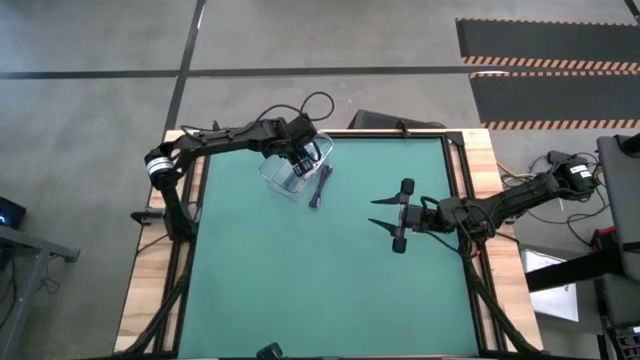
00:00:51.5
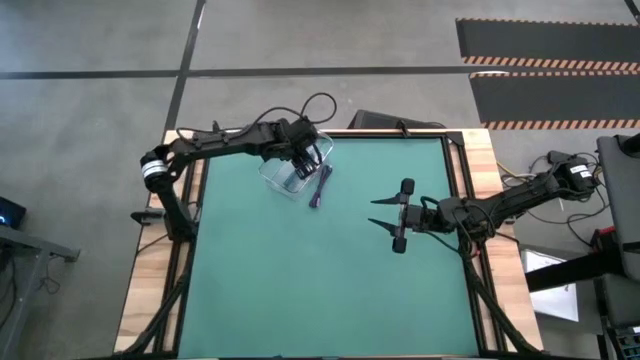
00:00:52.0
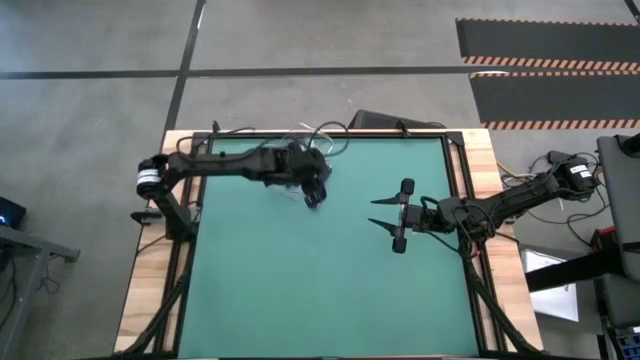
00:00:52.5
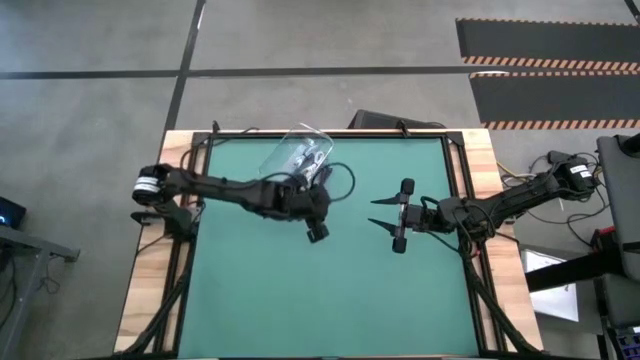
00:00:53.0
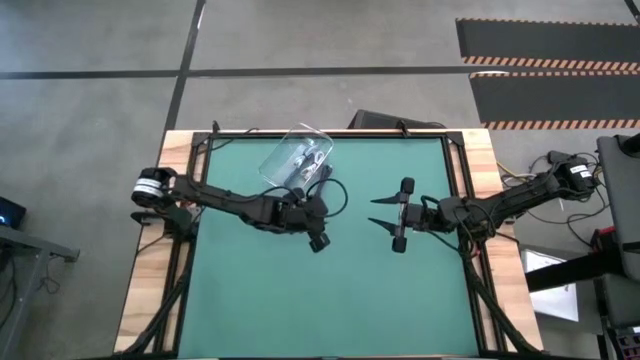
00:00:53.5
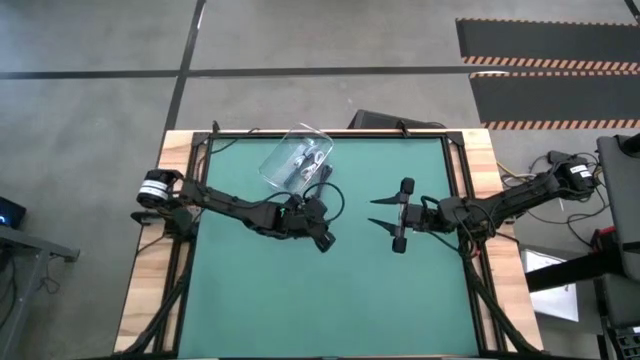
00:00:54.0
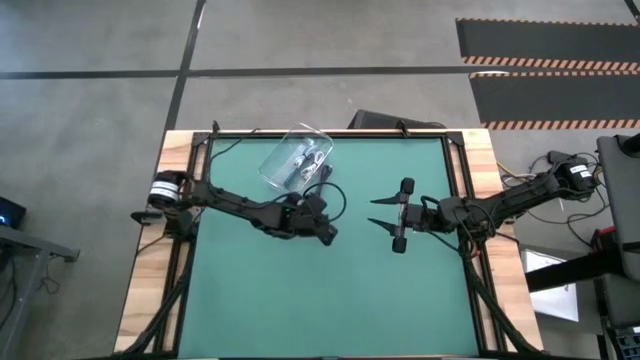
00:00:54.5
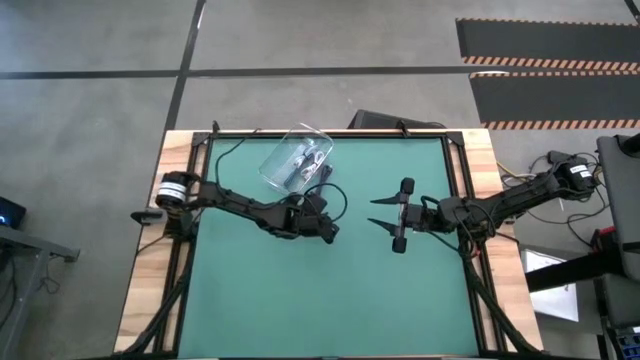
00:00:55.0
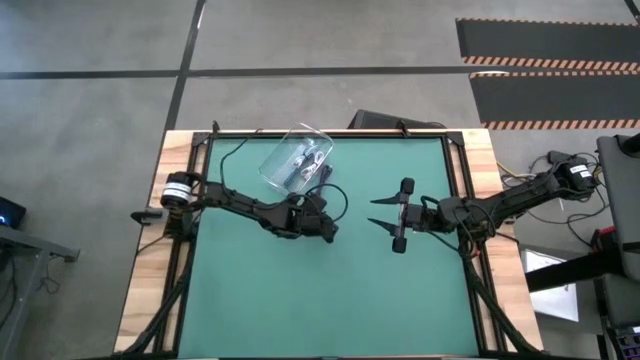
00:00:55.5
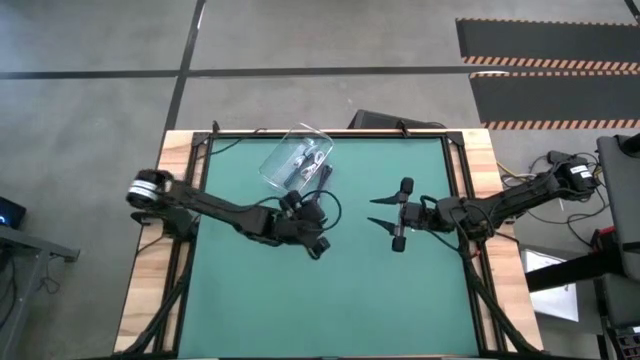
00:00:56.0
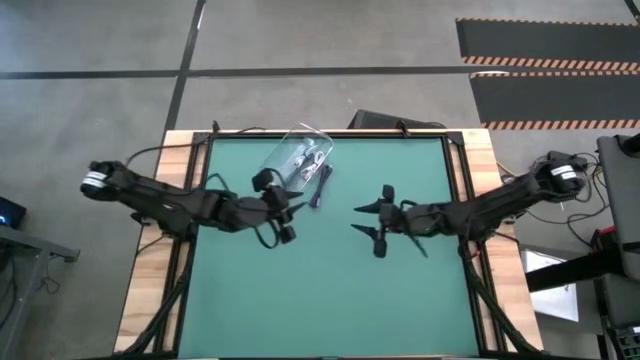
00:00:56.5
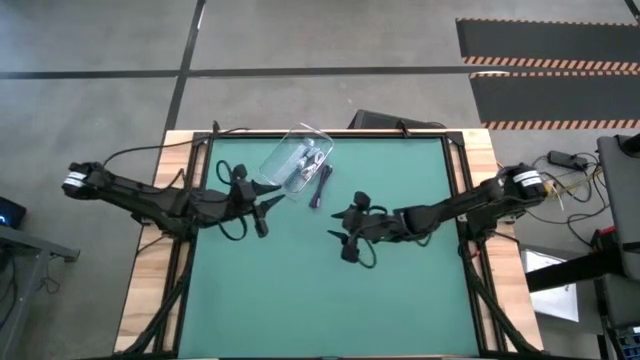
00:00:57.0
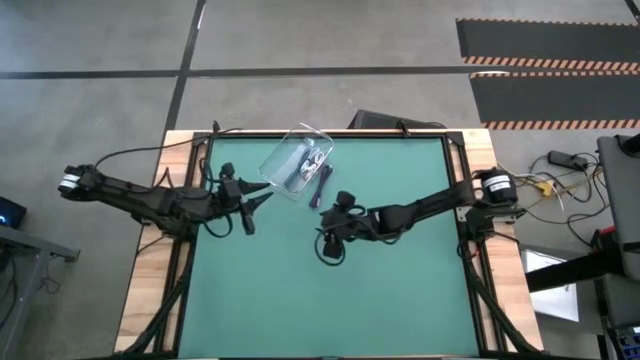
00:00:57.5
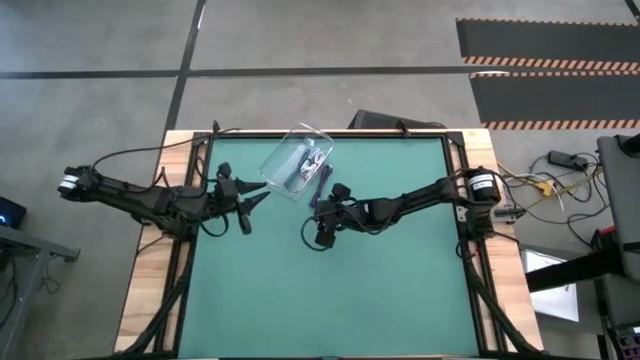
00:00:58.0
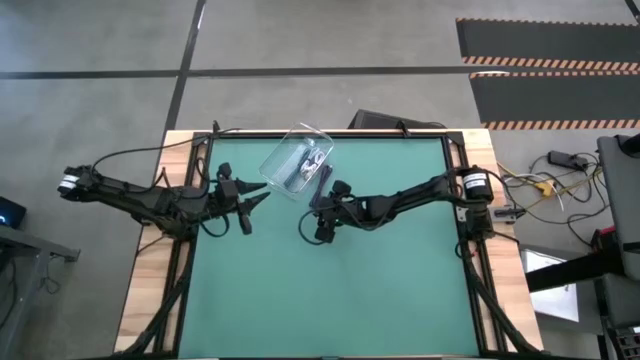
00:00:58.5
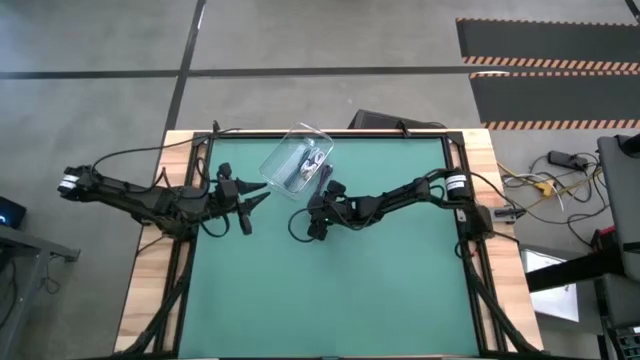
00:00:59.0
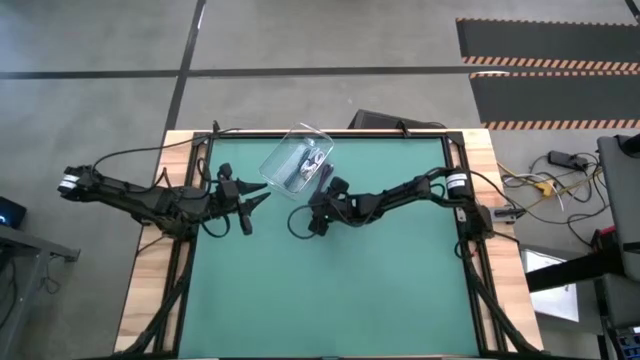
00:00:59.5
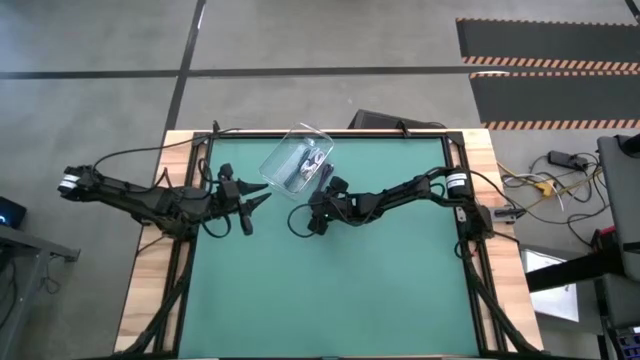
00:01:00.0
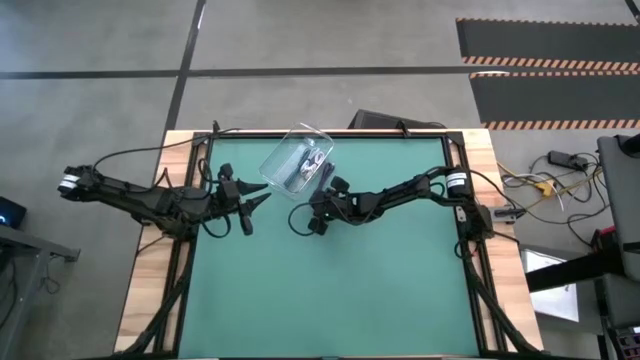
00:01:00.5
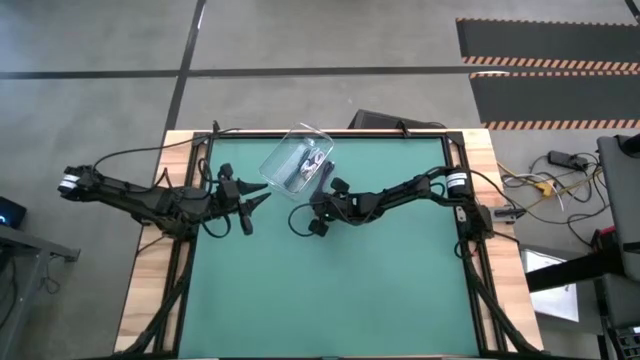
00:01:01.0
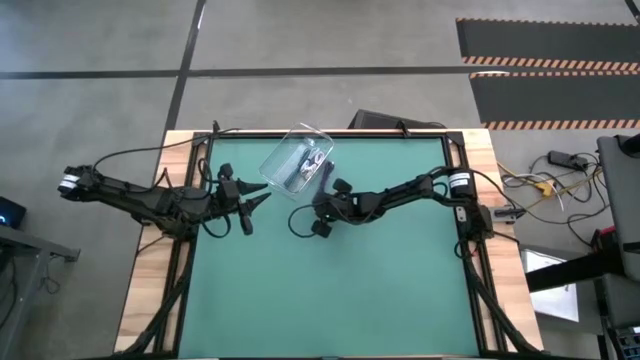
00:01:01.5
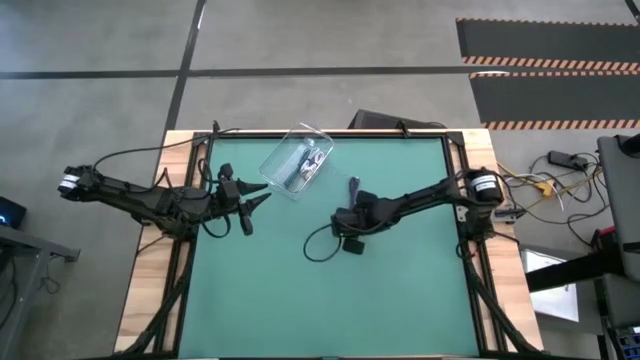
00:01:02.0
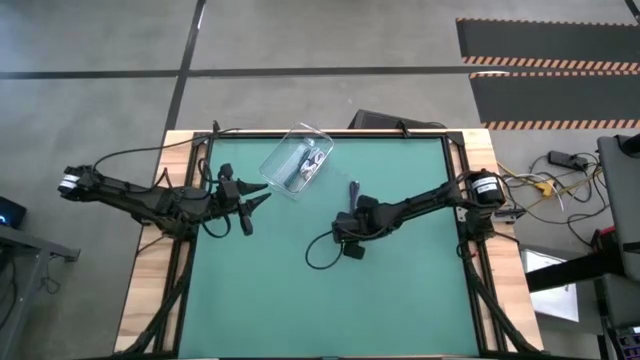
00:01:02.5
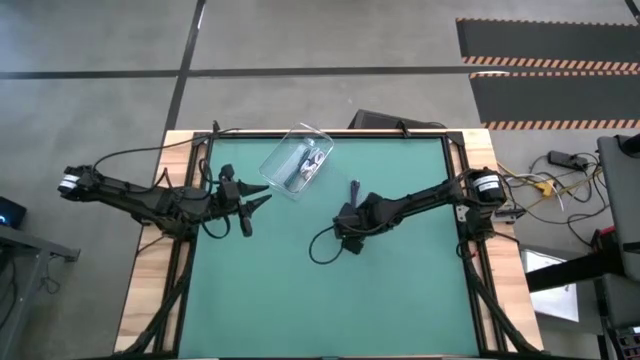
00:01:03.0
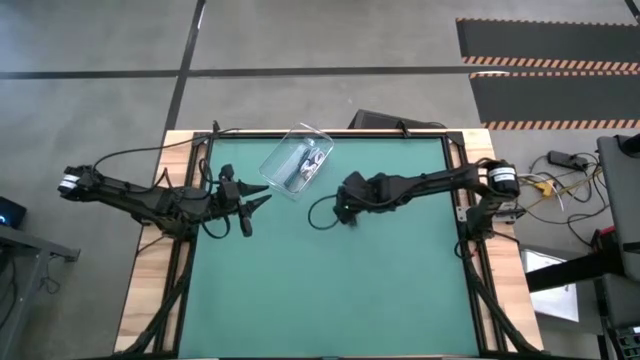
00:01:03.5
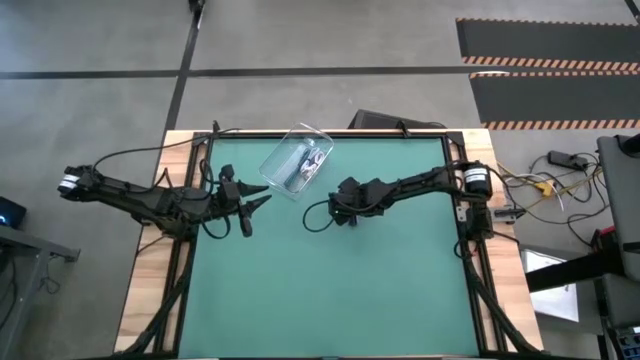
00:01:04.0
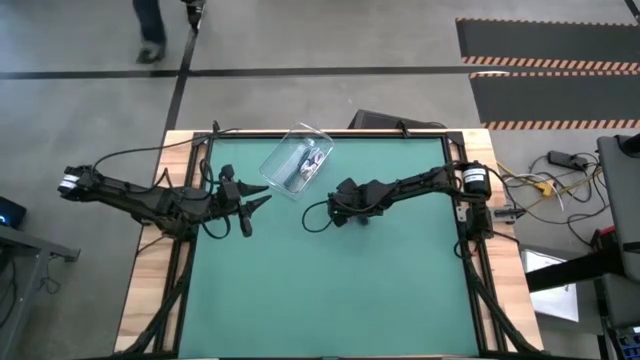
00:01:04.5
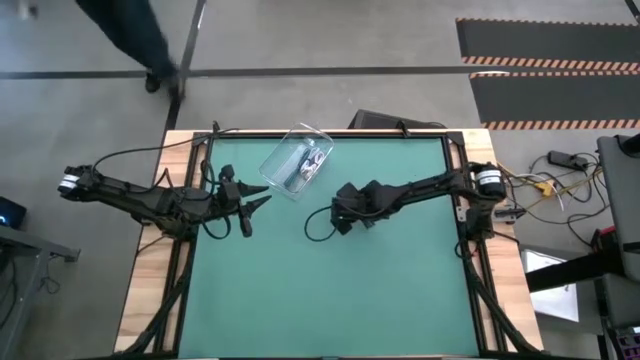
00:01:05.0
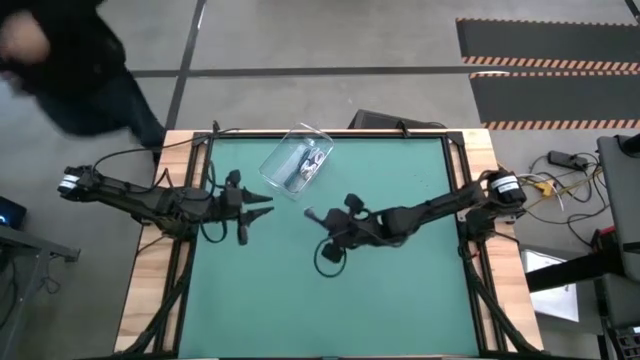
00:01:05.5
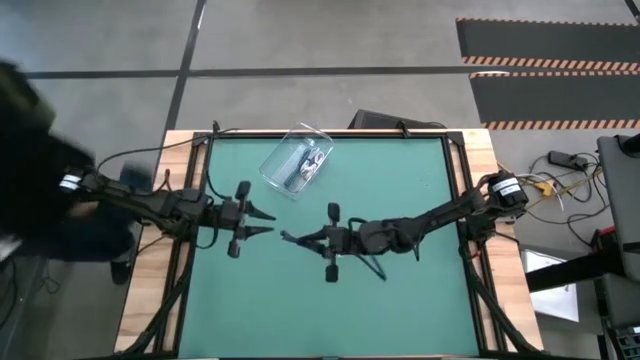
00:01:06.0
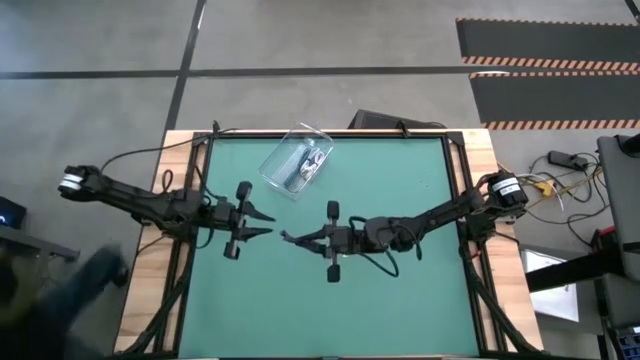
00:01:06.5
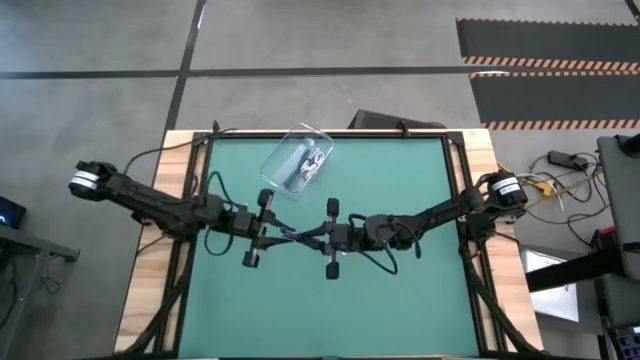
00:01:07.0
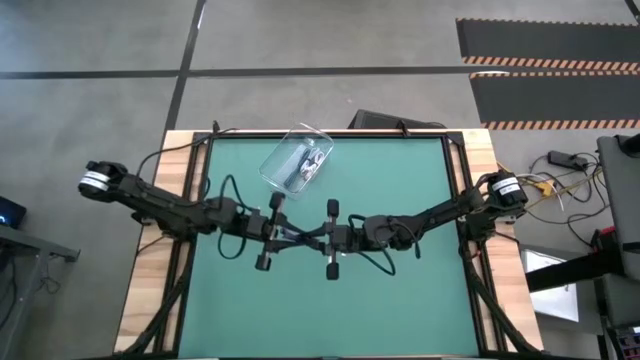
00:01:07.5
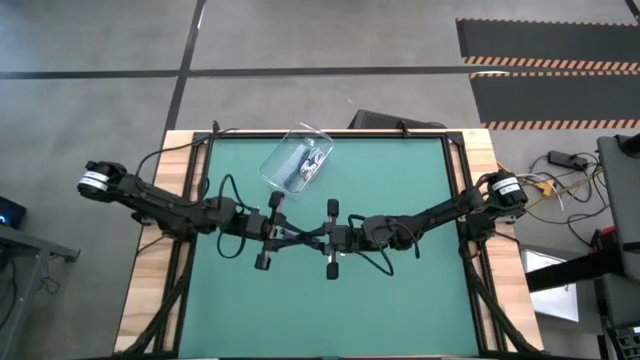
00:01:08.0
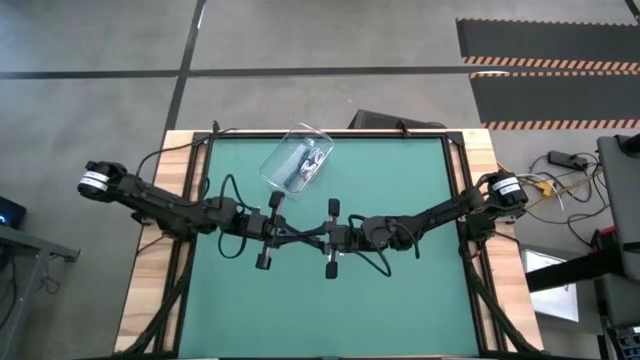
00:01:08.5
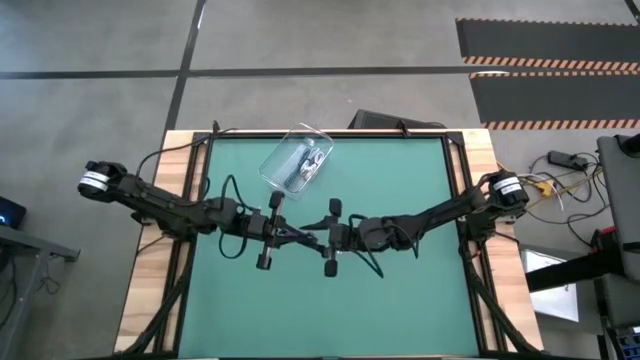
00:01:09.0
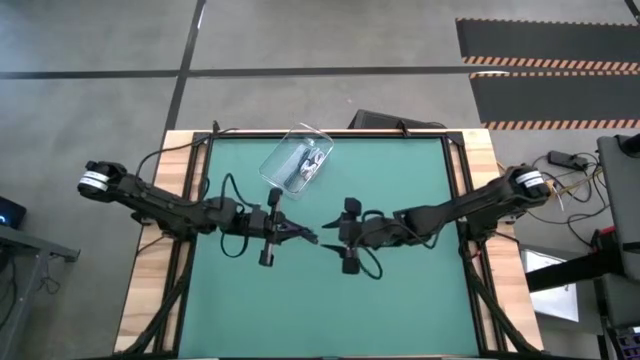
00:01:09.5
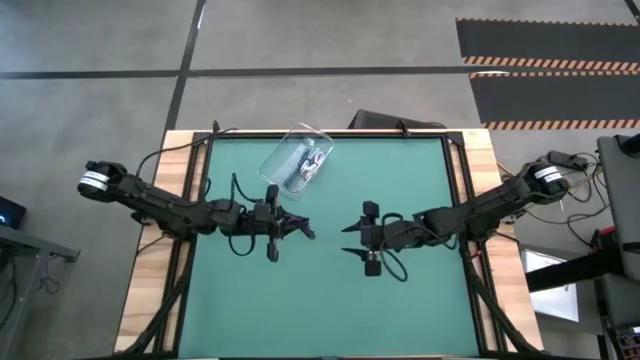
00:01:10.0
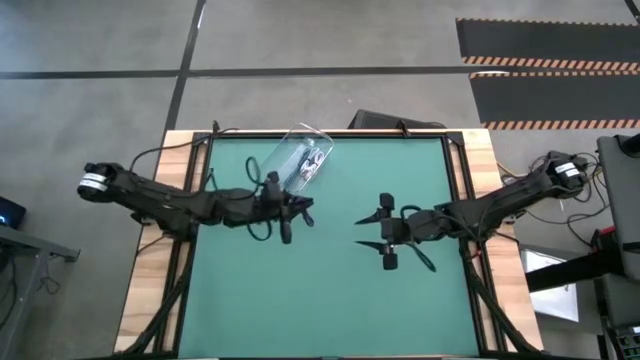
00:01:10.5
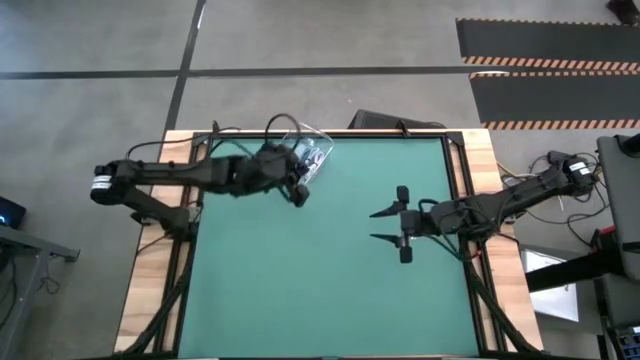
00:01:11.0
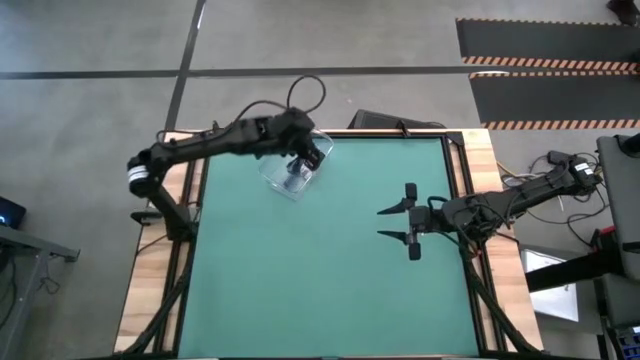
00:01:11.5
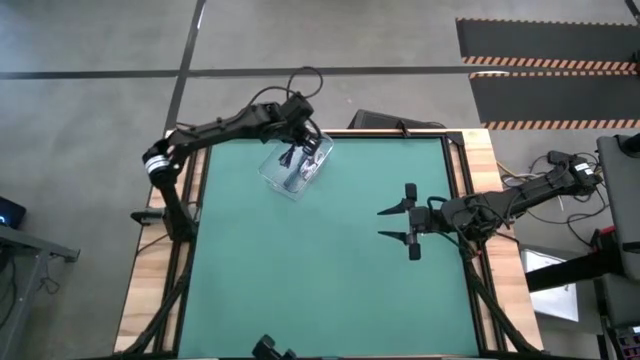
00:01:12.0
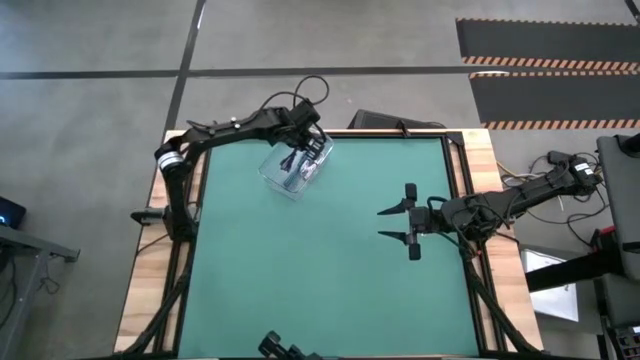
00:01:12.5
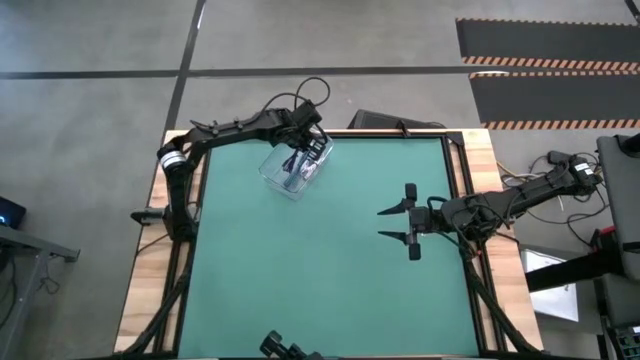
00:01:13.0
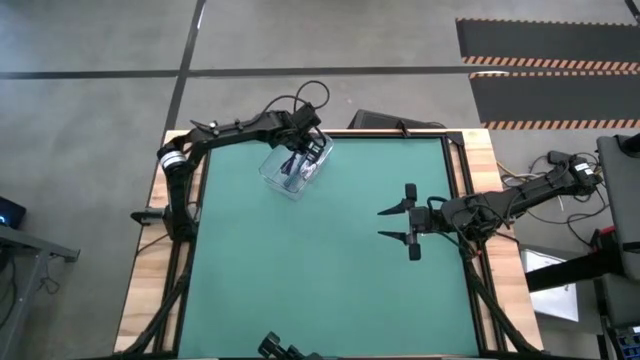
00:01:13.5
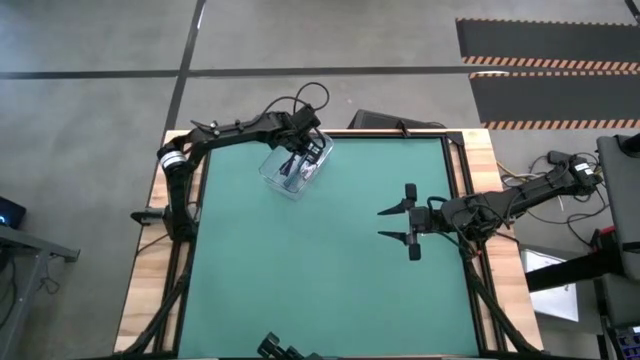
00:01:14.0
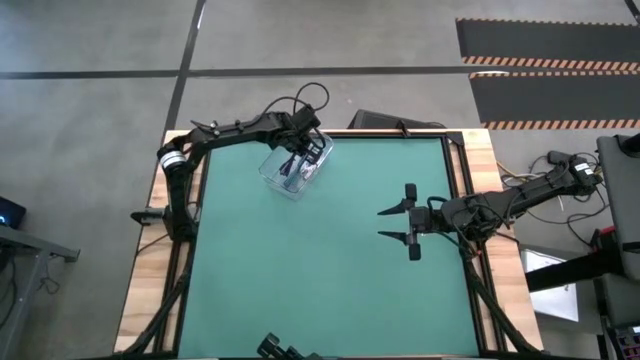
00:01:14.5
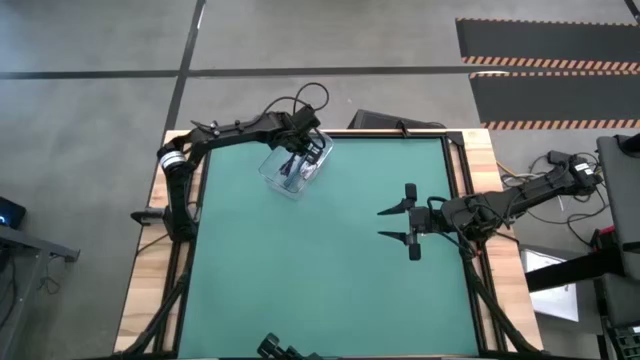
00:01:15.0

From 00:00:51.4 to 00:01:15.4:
Task: Pick and place USB-C Cables
Put the violet USB cable into the transparent bin
